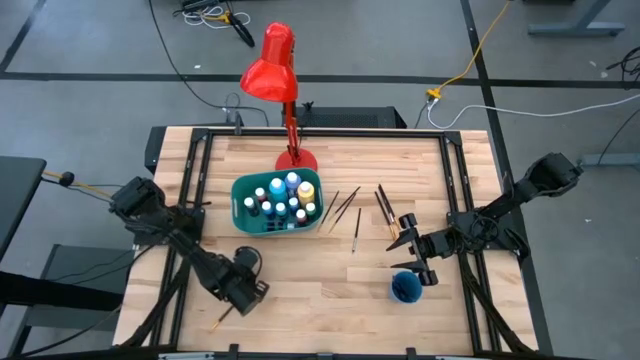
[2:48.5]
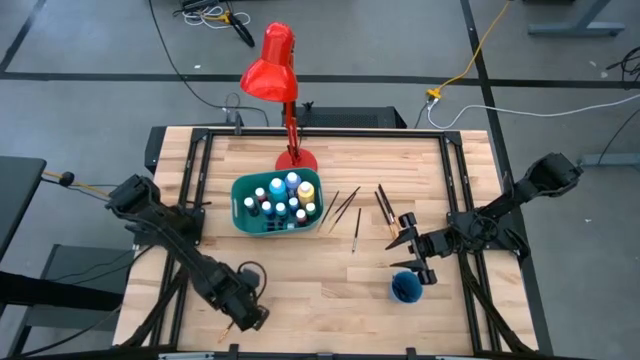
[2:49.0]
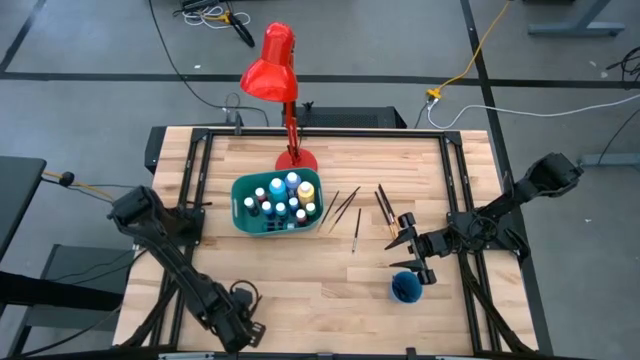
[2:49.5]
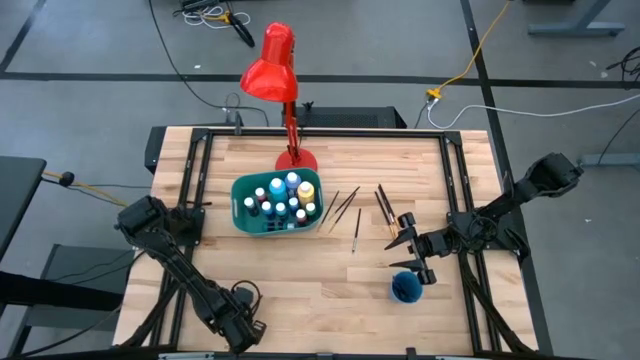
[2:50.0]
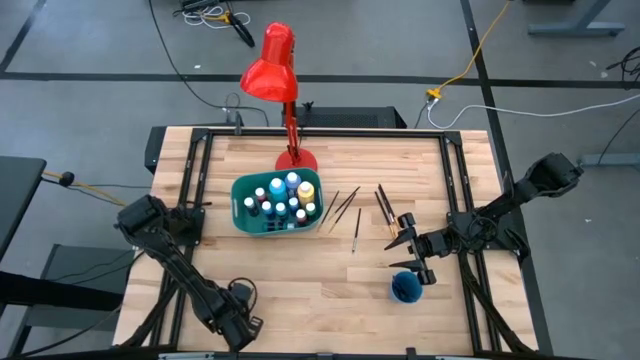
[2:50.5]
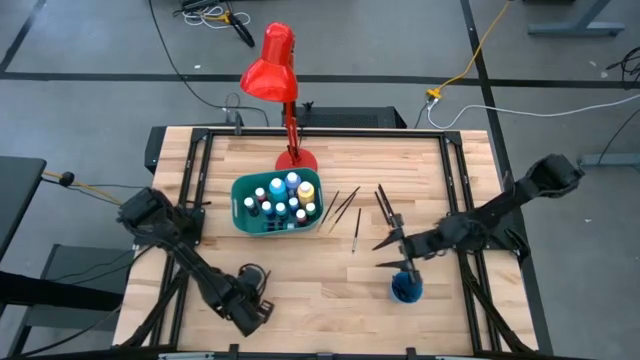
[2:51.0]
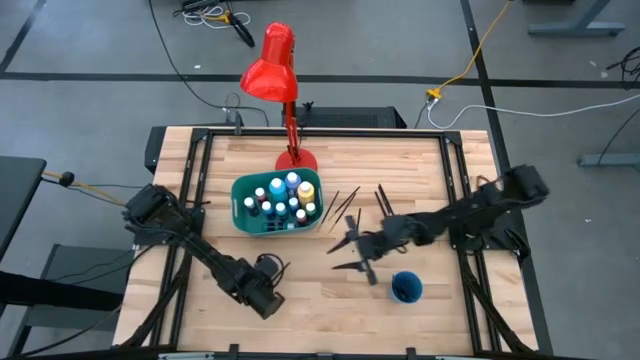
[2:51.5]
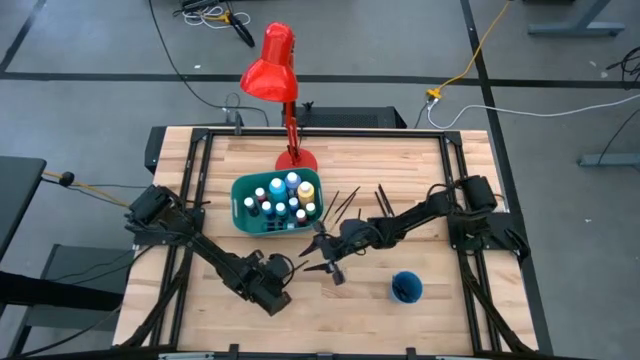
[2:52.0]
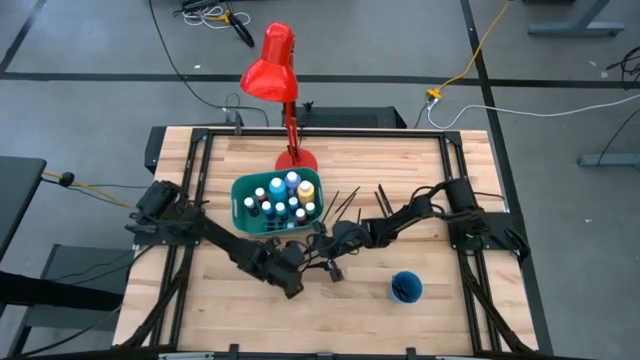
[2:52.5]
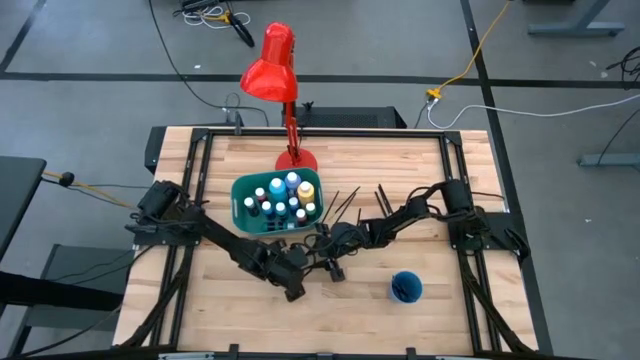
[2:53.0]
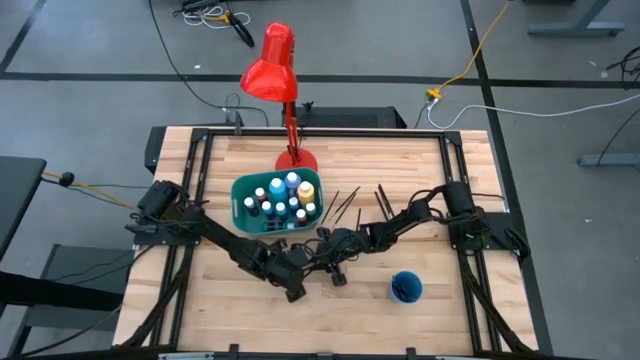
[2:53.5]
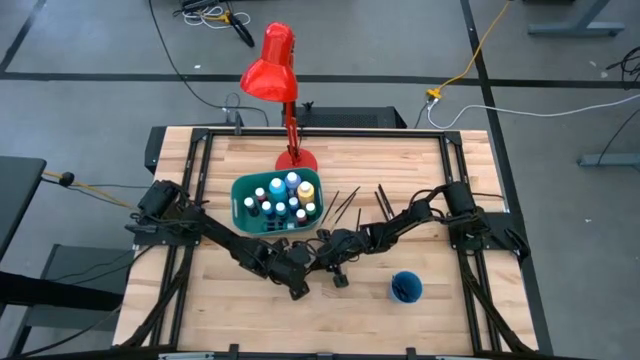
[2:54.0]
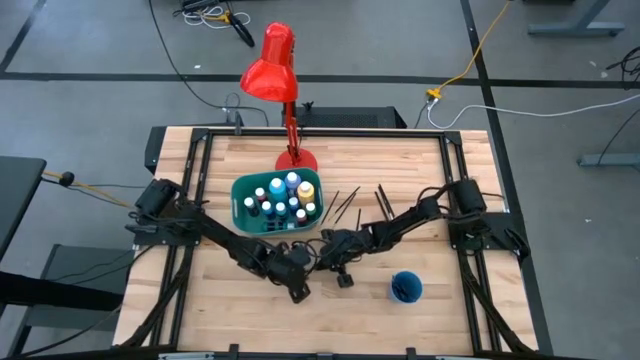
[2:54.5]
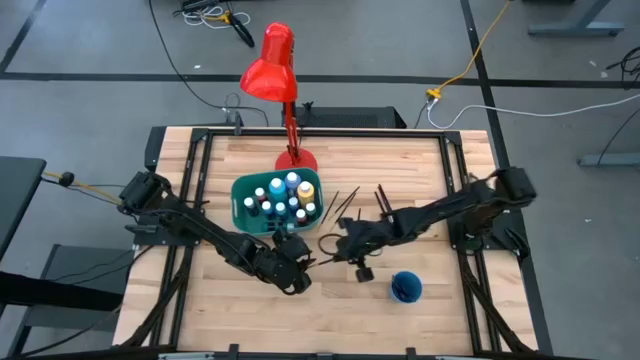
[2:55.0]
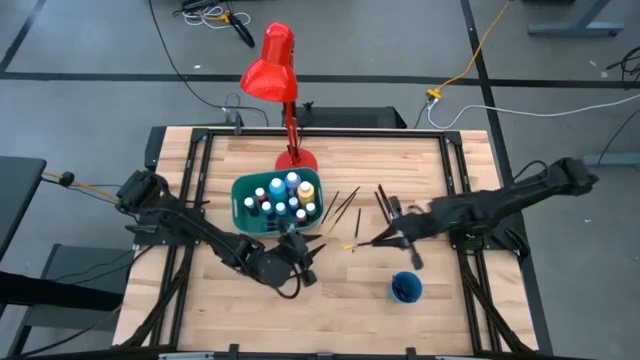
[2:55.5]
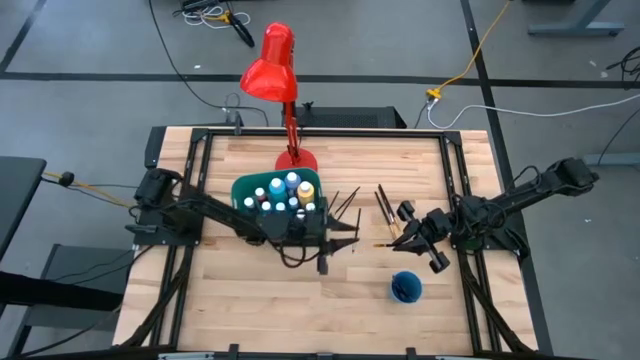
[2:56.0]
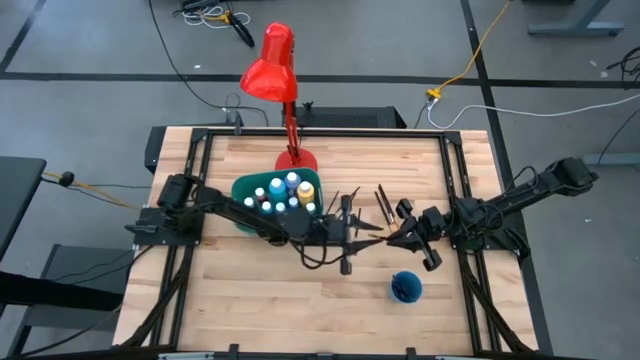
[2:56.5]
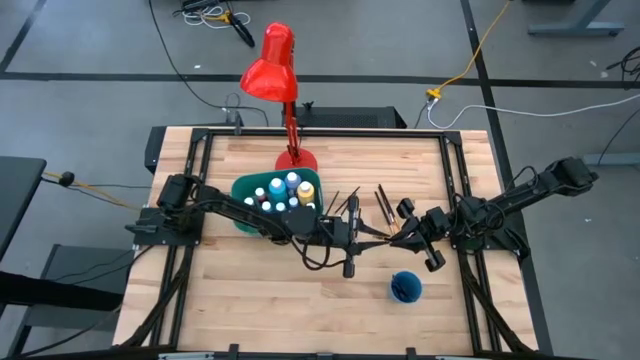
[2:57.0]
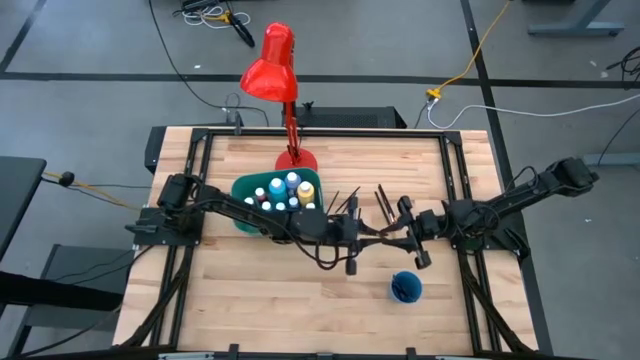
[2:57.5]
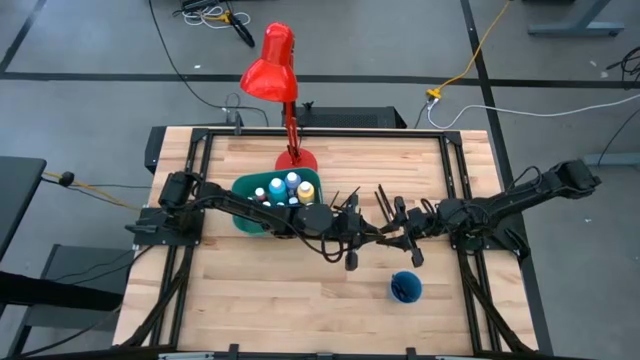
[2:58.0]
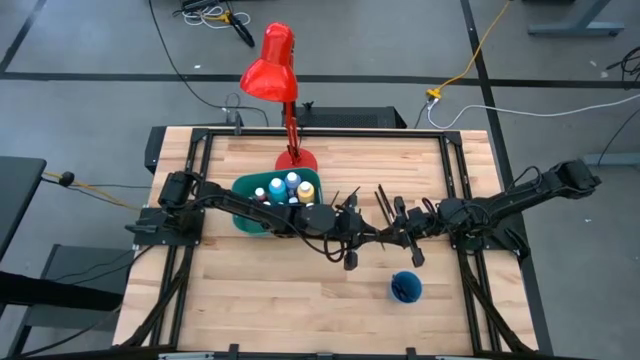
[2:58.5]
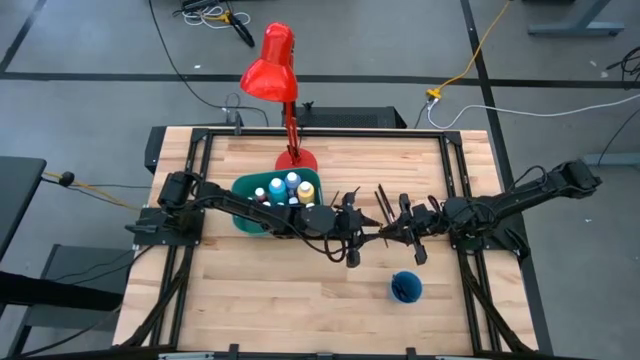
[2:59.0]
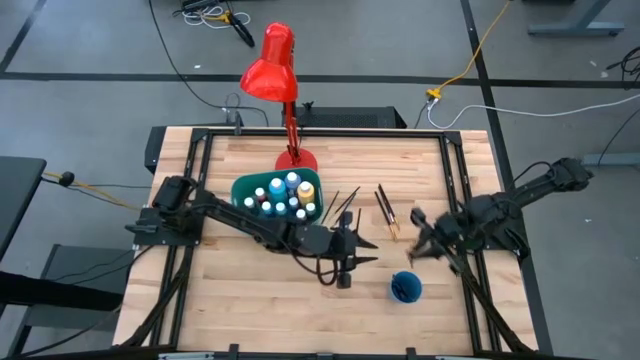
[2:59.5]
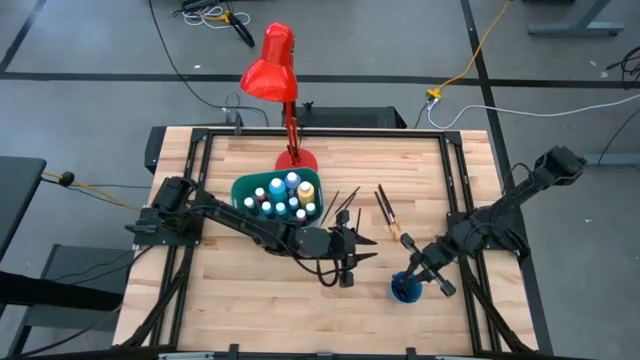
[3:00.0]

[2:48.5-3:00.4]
Task: Pick & Place Paint Supplies
Put the gold paint brush into the blue cup

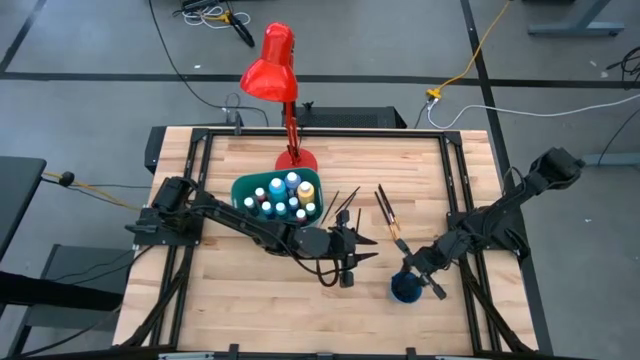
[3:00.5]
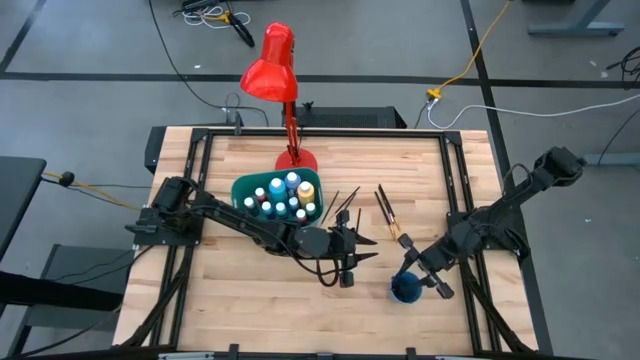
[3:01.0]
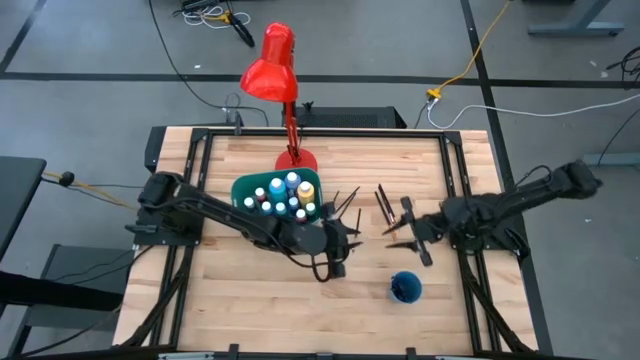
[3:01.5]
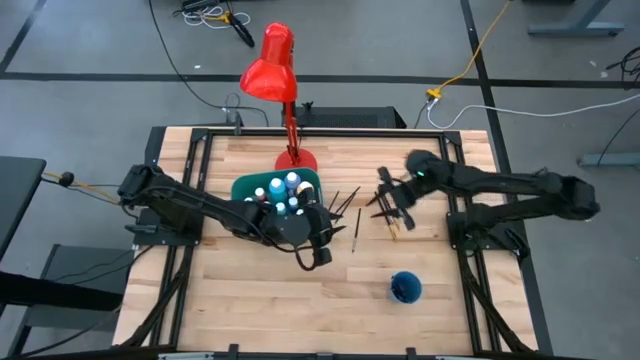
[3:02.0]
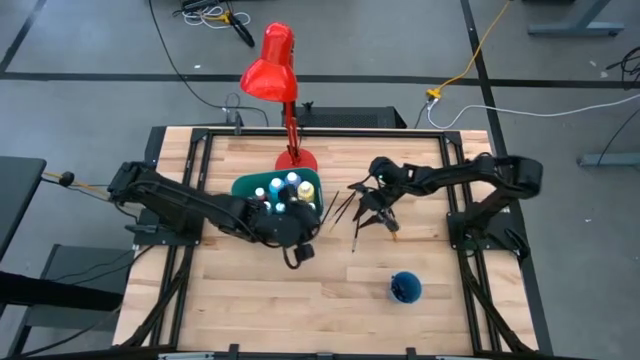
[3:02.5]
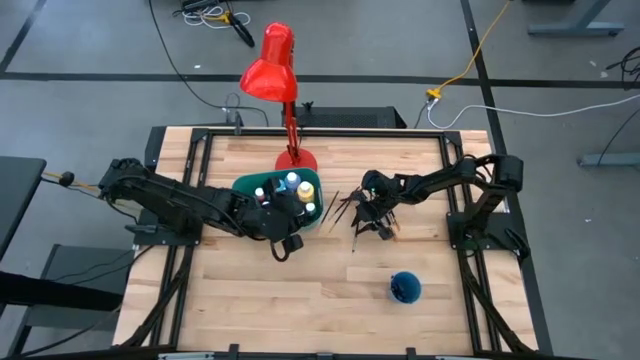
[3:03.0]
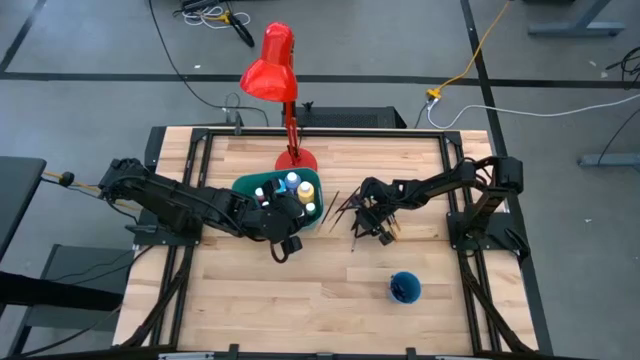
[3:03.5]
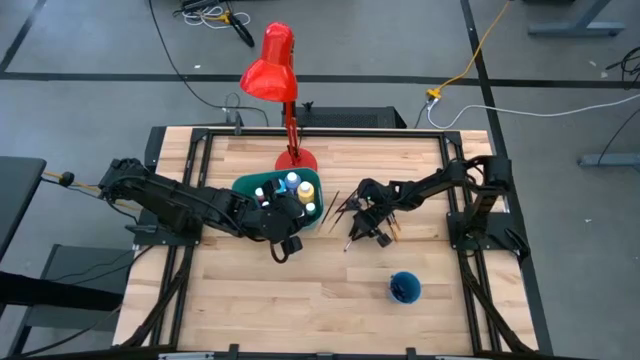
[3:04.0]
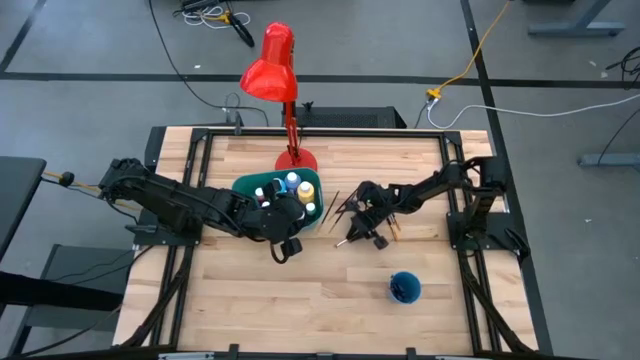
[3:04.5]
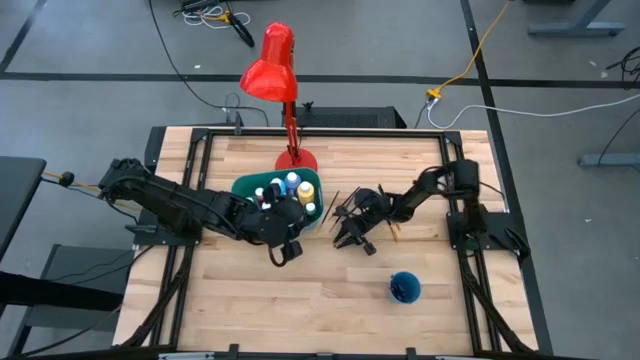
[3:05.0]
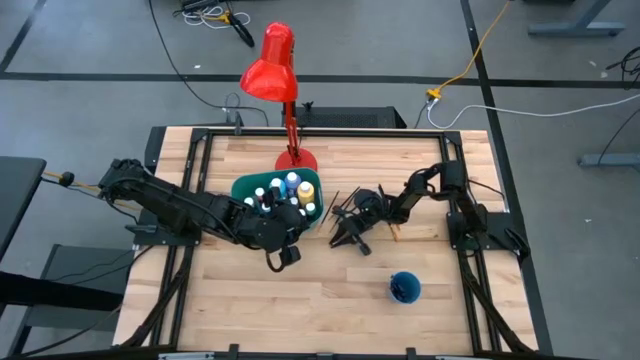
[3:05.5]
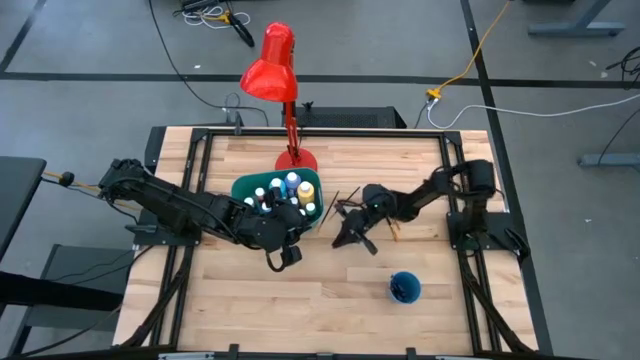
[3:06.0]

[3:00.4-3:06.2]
Put the silver paint brush into the blue cup

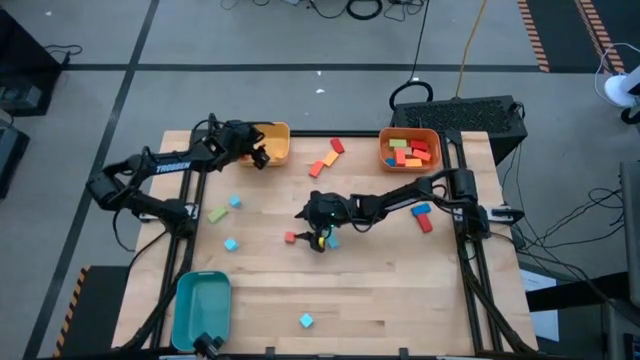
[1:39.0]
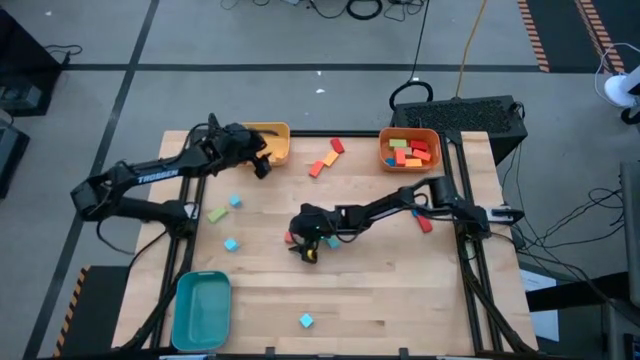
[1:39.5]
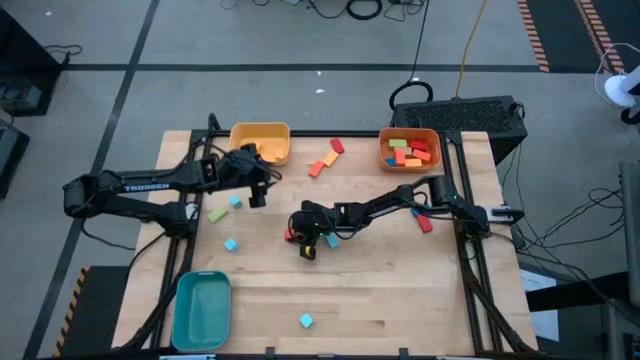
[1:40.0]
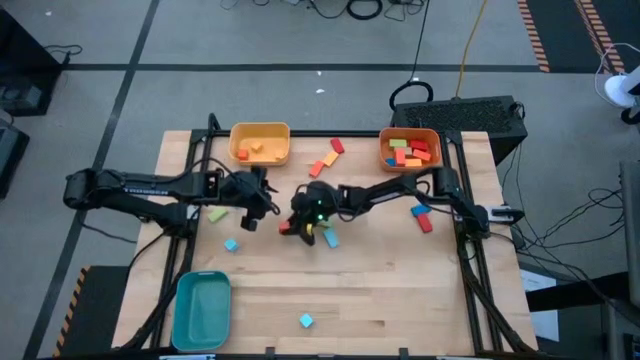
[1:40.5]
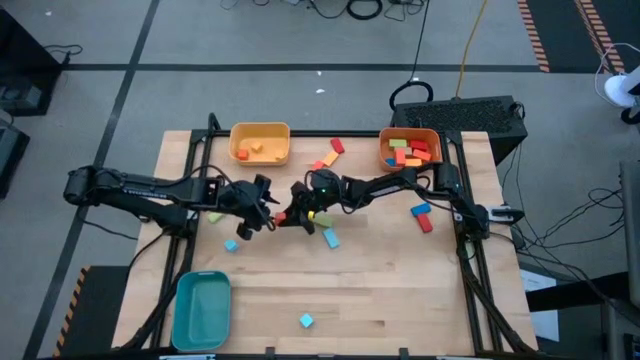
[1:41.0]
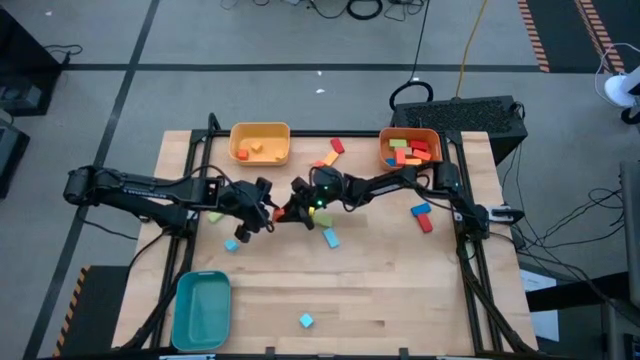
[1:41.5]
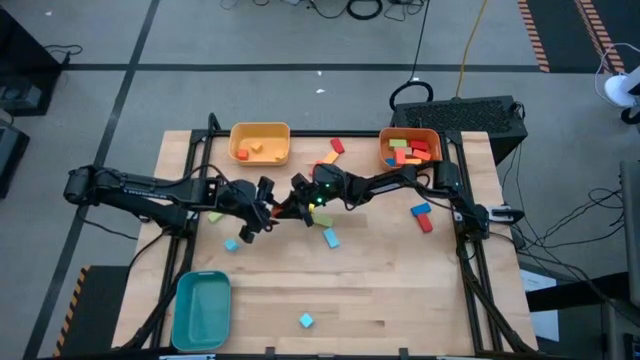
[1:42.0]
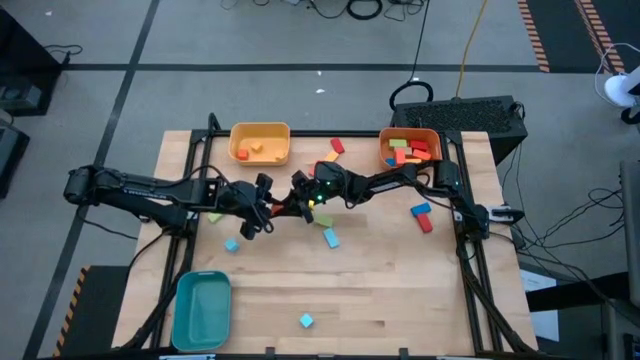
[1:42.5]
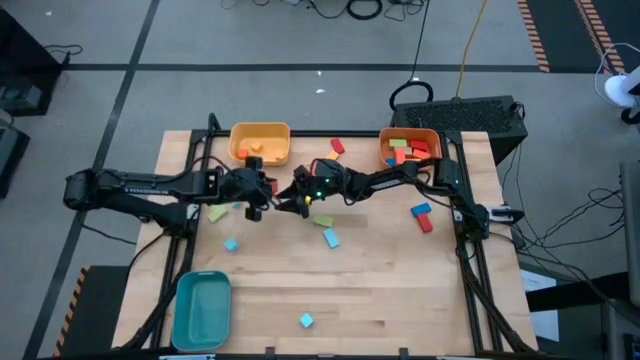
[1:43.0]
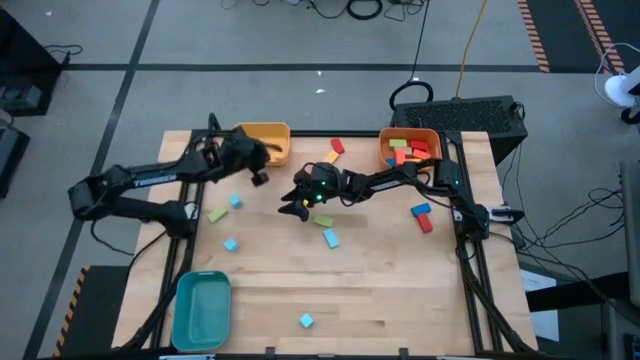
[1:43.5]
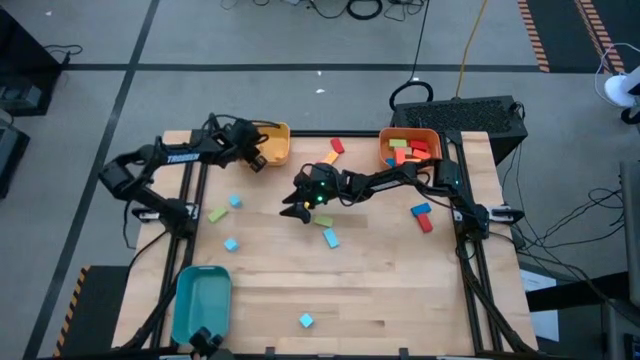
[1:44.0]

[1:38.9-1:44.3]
Task: Sort blocks by size
Put the small orange block into the yellow bin
